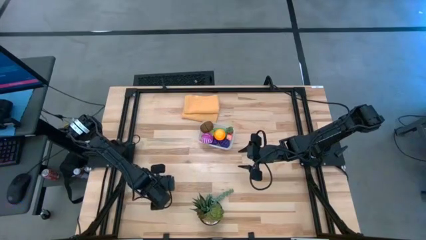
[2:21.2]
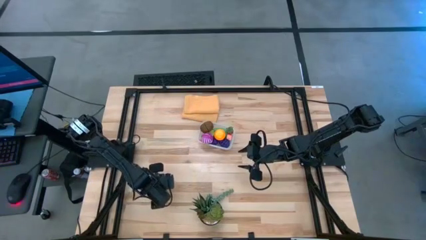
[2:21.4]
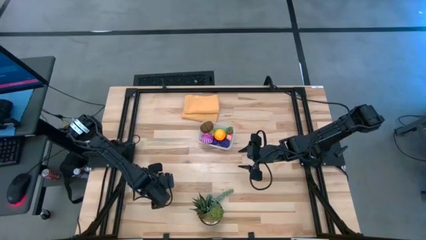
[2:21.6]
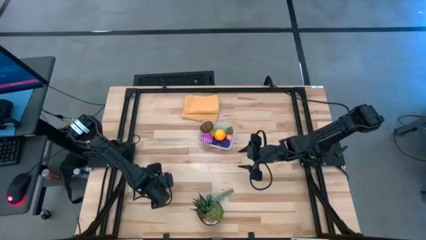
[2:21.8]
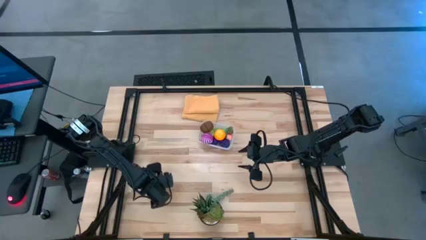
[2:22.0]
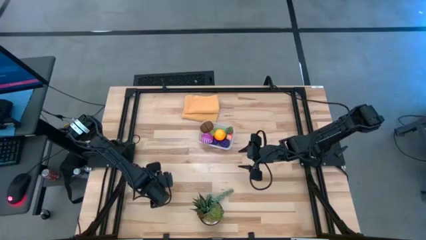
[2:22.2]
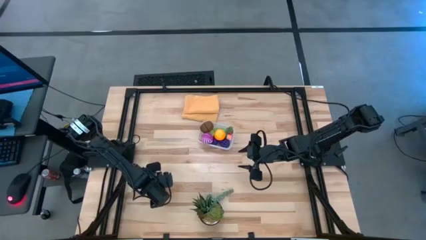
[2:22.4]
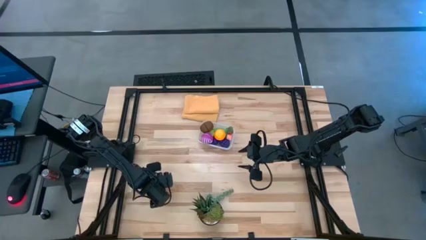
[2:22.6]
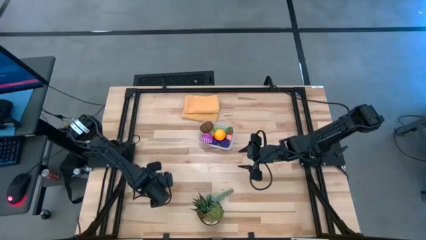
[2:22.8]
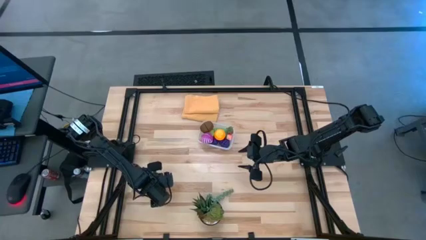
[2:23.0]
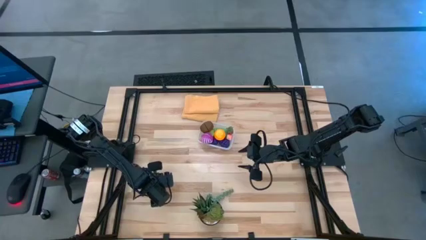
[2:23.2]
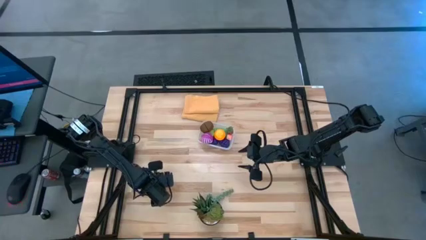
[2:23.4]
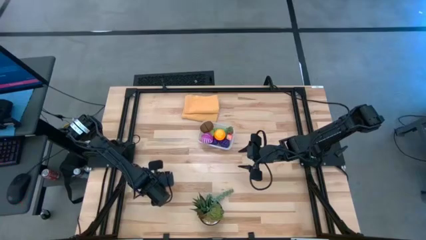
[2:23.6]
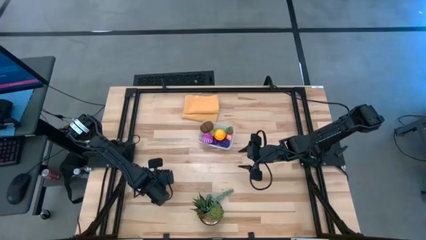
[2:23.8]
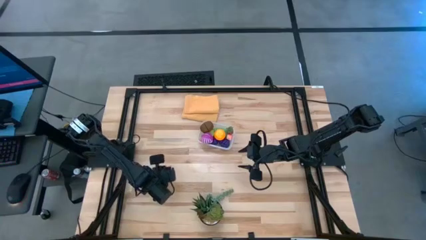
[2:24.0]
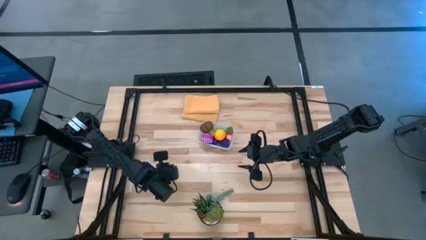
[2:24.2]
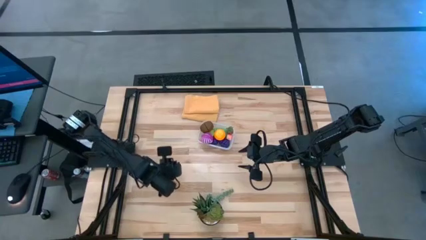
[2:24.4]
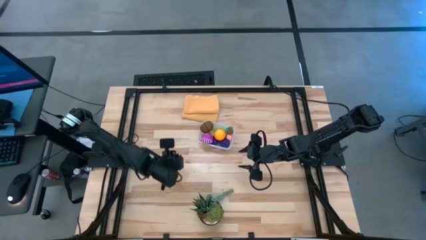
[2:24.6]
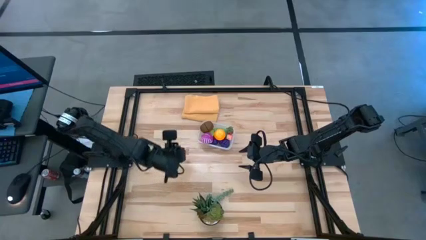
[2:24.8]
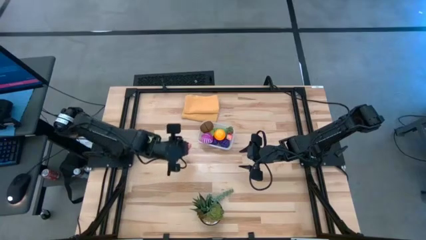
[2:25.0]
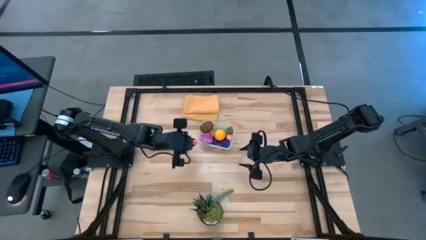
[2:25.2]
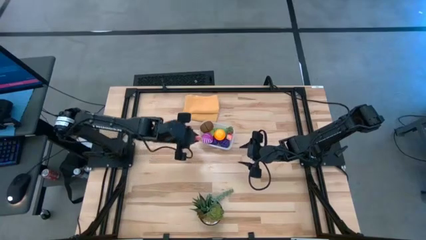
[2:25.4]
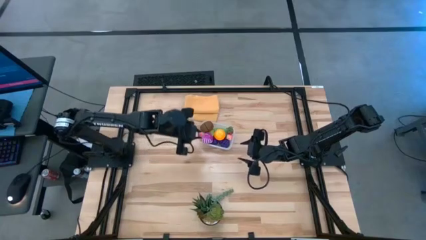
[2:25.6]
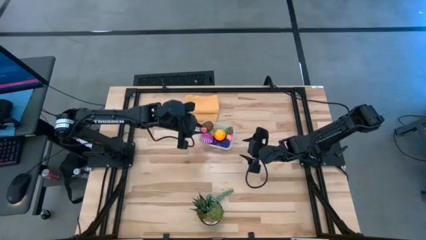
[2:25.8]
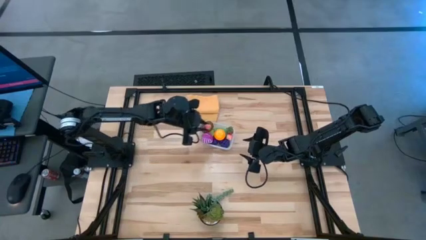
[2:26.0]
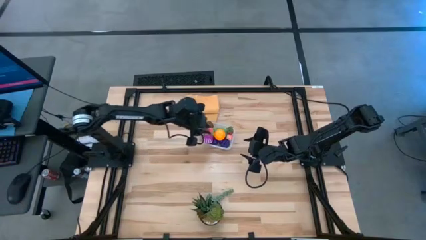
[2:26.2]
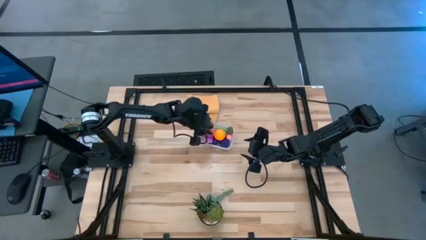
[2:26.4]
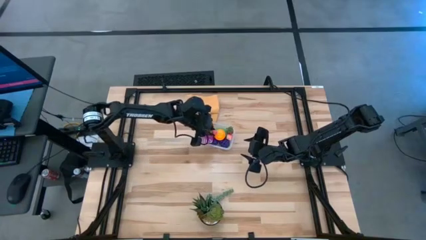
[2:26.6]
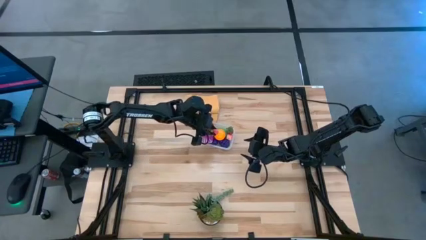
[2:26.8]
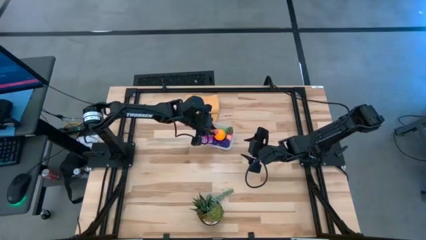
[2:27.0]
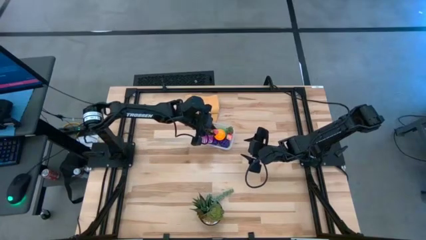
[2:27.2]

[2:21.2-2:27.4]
Task: Pick and placing Produce into tupperware
Put the pink peach into the transparent container

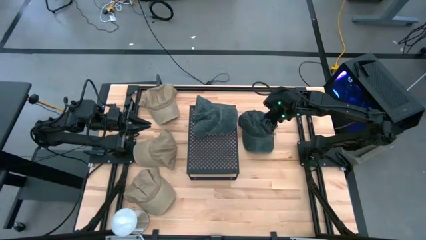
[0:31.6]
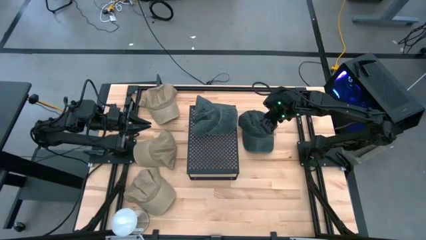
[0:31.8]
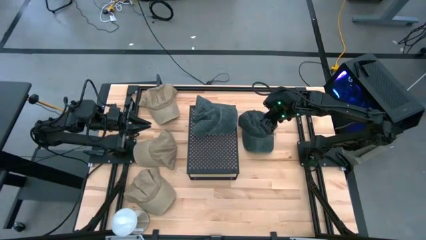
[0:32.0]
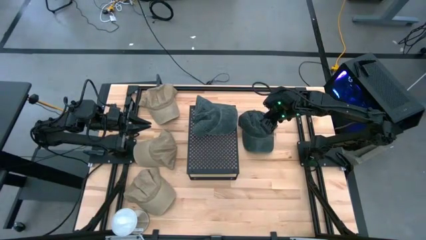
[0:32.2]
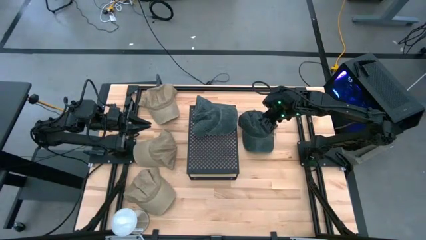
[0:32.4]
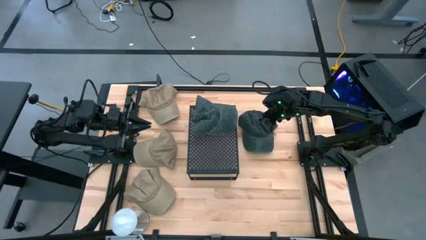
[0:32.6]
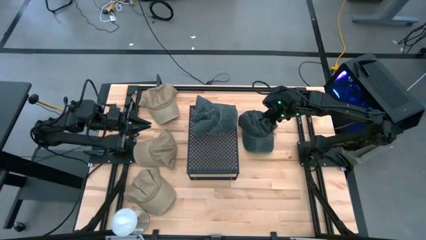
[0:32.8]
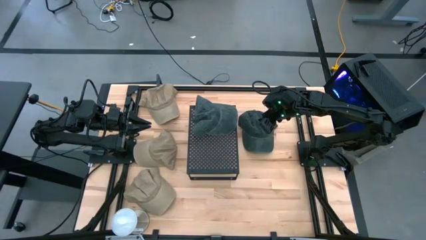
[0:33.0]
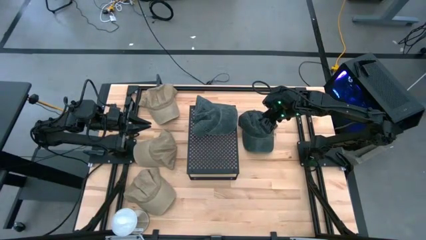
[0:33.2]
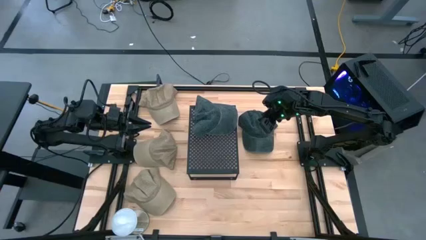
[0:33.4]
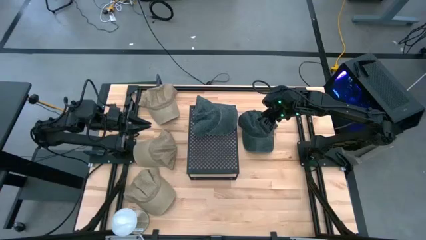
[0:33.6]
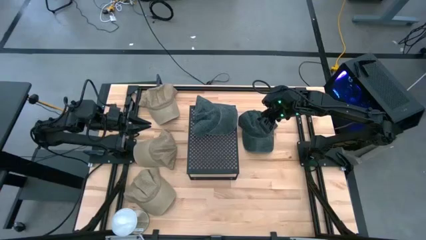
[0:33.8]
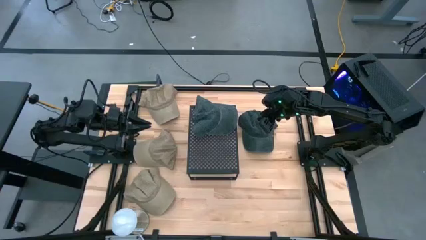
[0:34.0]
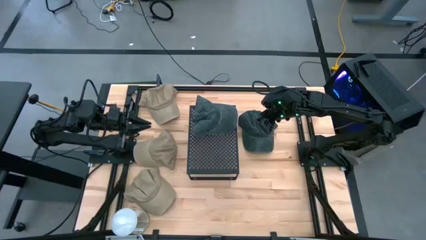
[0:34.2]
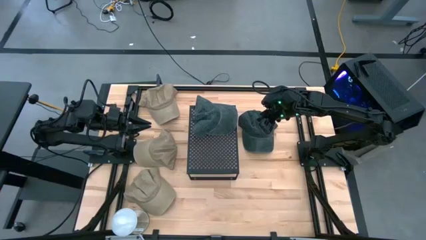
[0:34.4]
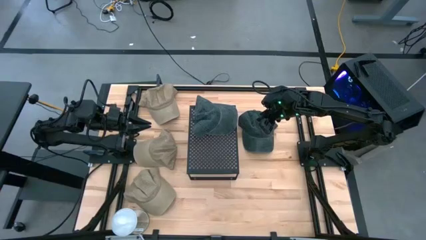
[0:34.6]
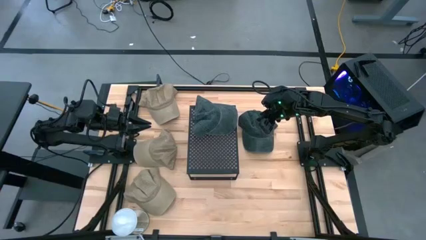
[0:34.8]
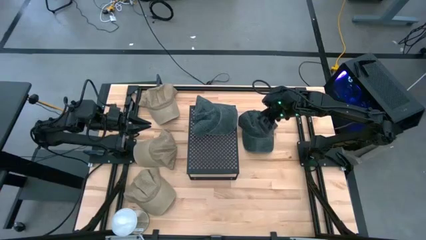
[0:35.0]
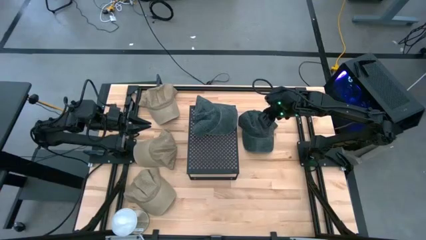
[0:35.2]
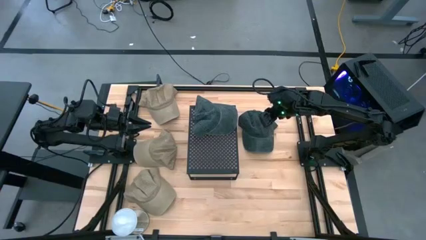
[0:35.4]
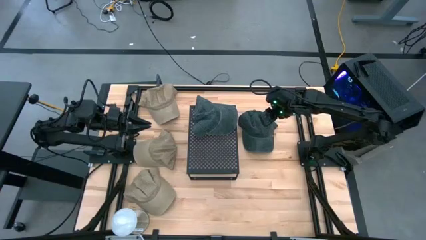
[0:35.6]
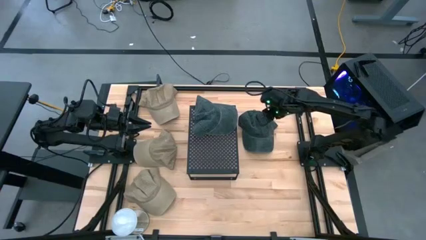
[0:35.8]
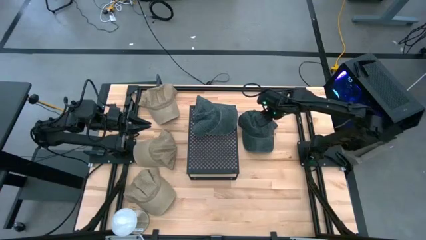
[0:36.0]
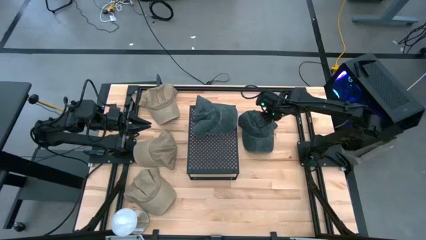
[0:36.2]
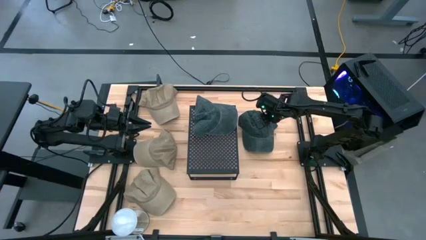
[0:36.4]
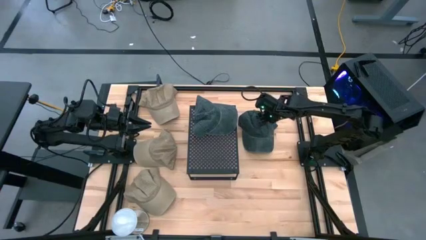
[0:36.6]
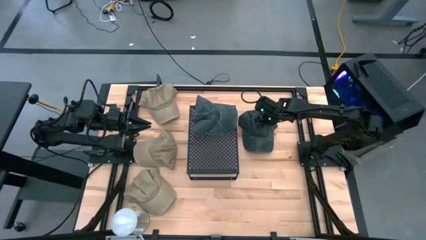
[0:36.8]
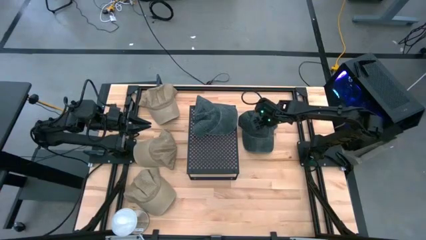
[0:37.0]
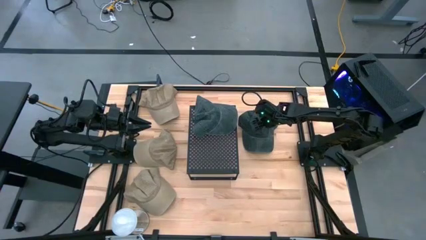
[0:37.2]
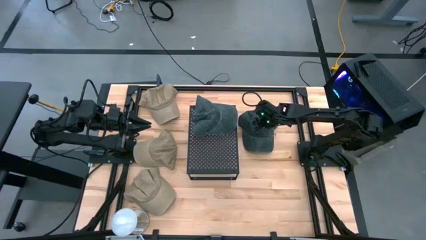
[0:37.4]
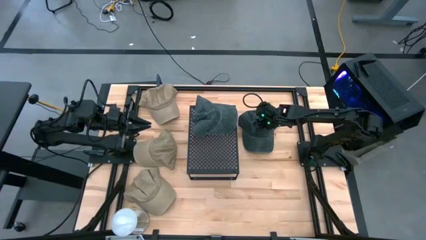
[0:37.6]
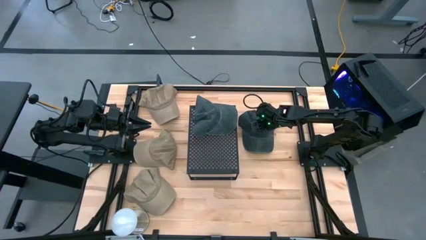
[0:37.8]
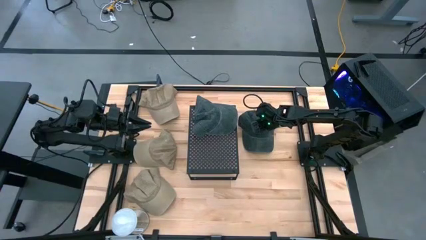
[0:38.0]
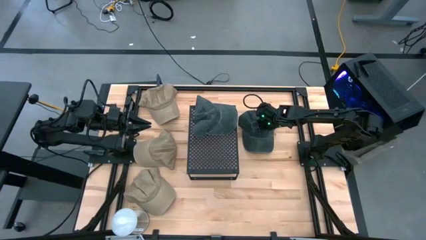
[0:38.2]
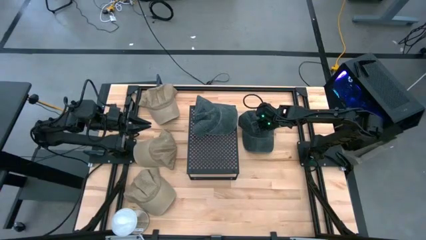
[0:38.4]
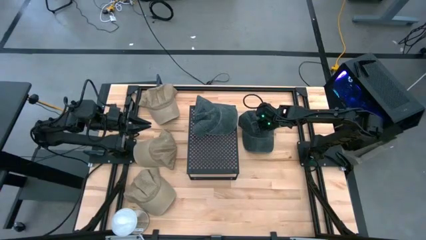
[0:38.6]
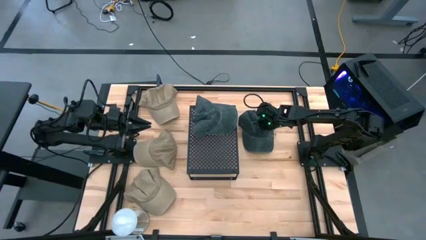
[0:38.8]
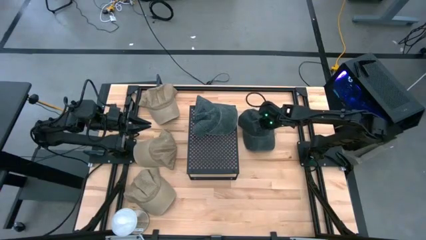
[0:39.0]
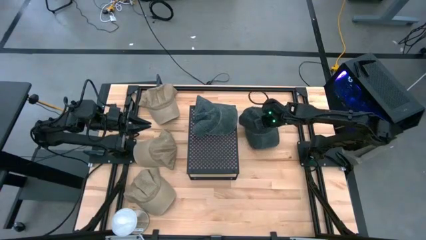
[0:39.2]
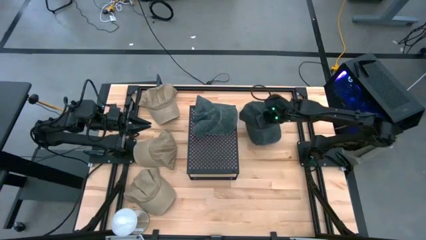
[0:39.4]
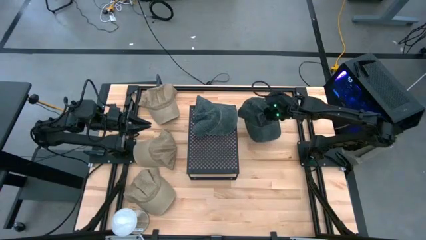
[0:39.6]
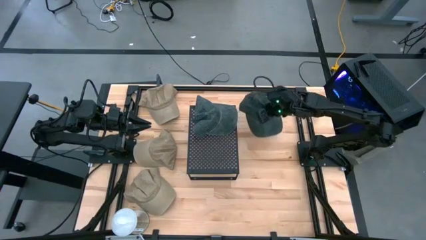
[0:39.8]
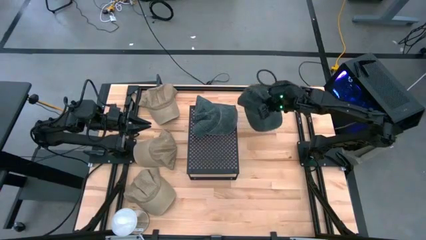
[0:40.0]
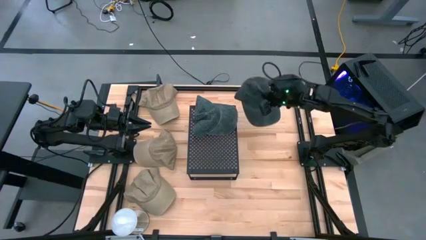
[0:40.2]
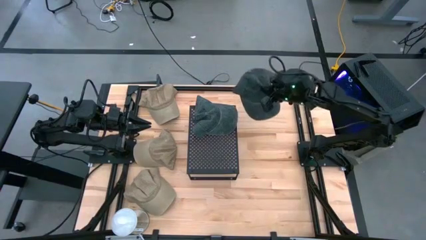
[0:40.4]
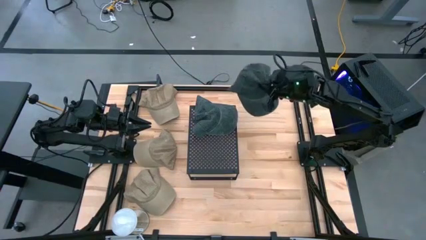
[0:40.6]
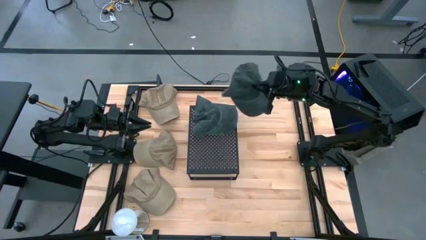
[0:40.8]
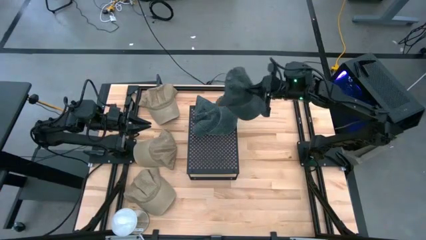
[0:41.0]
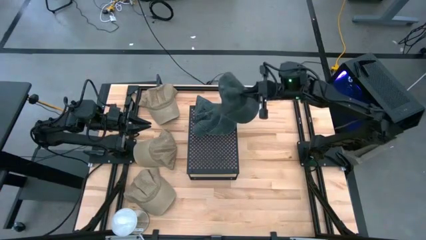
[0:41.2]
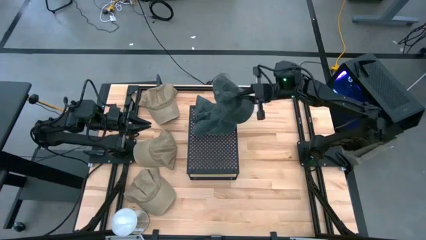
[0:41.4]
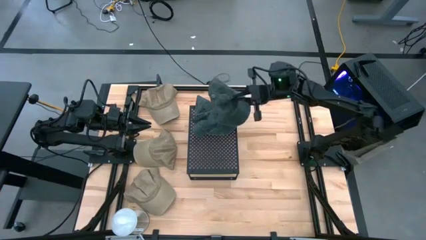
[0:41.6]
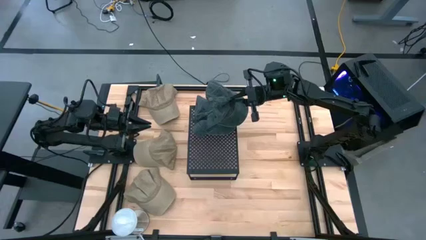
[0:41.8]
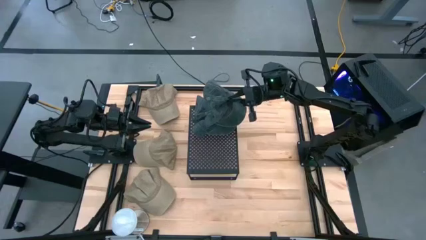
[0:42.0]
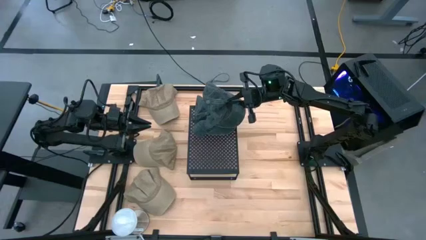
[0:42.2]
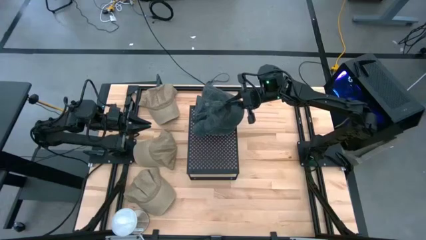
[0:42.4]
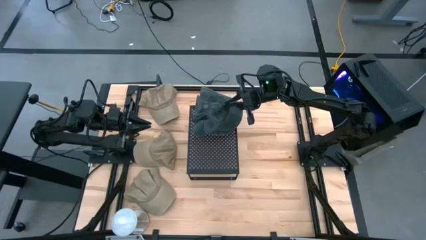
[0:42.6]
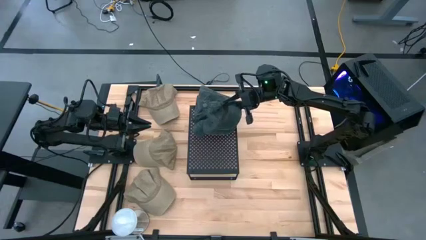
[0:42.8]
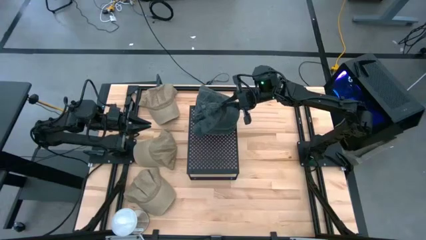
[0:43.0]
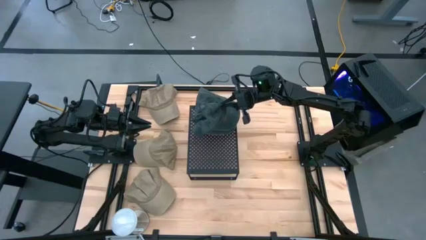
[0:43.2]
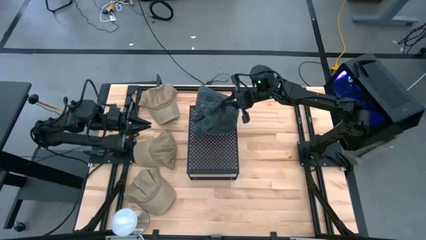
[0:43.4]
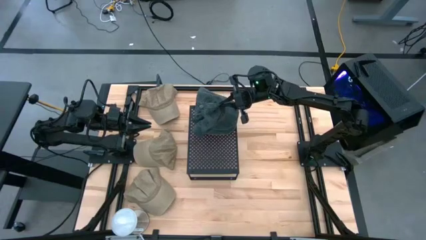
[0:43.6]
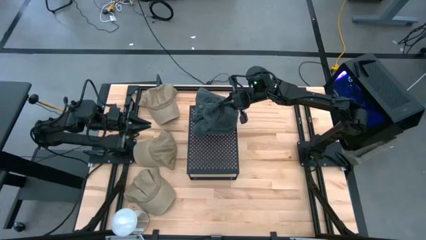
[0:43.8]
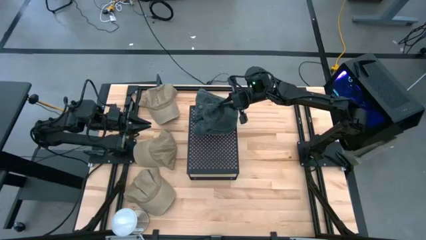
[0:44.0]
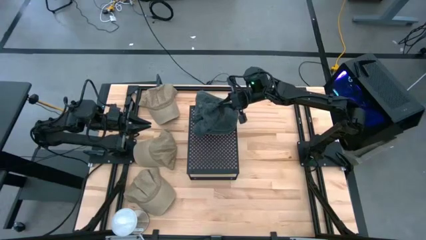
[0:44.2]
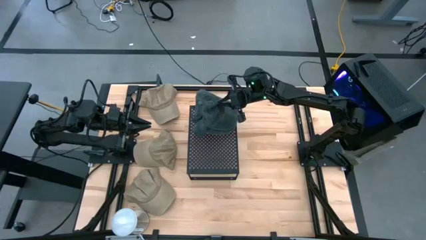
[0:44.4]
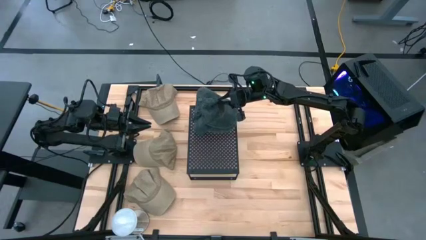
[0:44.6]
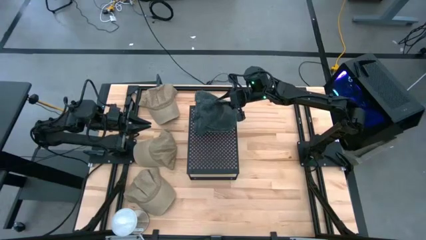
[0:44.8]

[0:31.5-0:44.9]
Task: Pick & Place hat
Stack the gray cap on top of the other gray cap on the shelf
